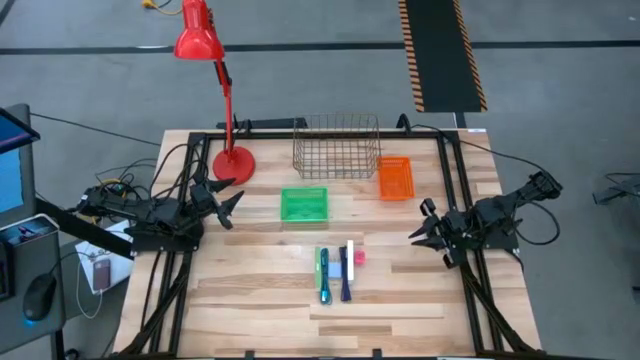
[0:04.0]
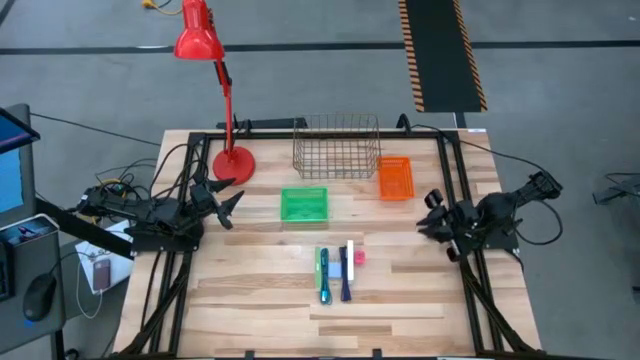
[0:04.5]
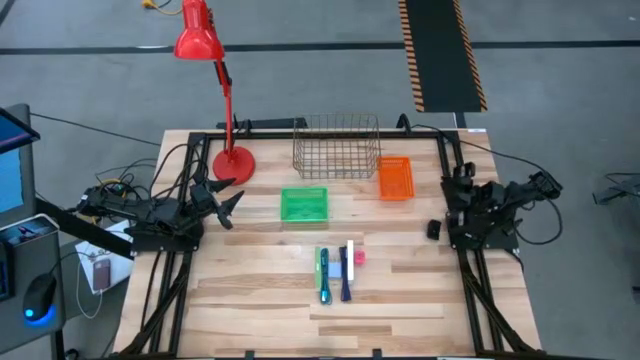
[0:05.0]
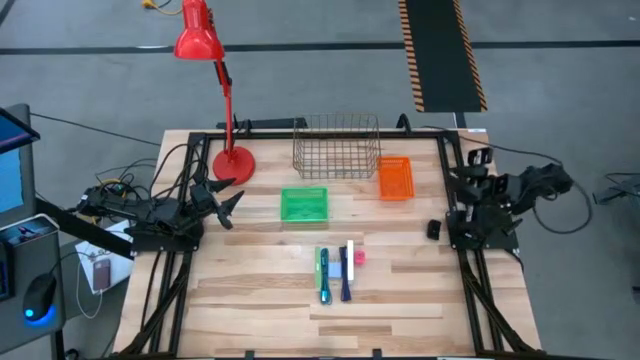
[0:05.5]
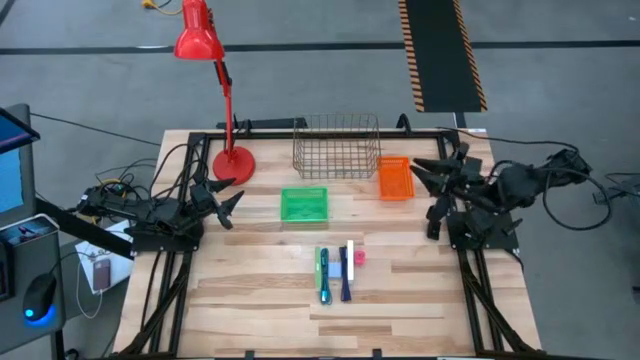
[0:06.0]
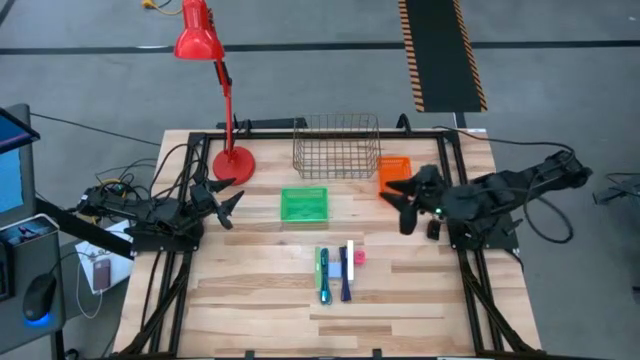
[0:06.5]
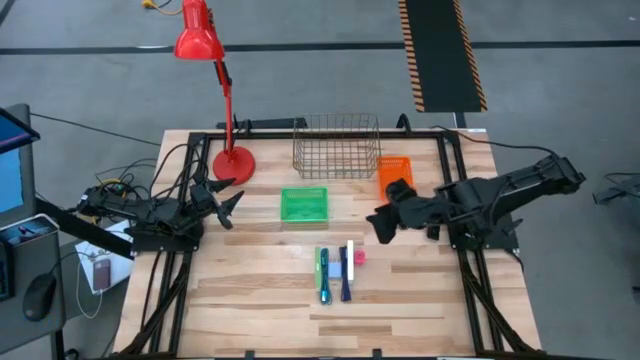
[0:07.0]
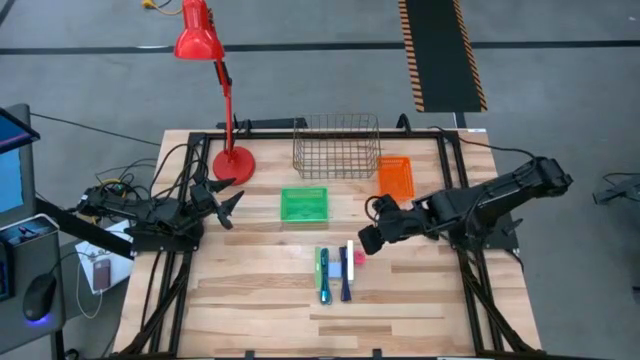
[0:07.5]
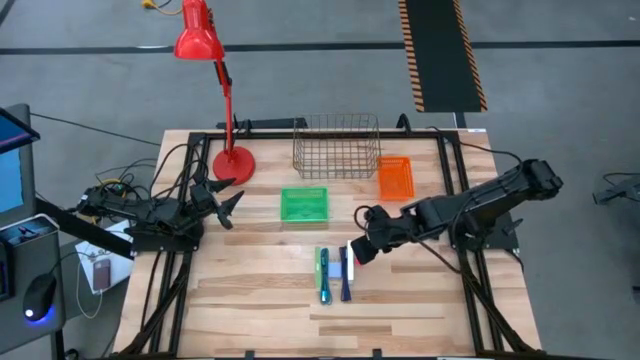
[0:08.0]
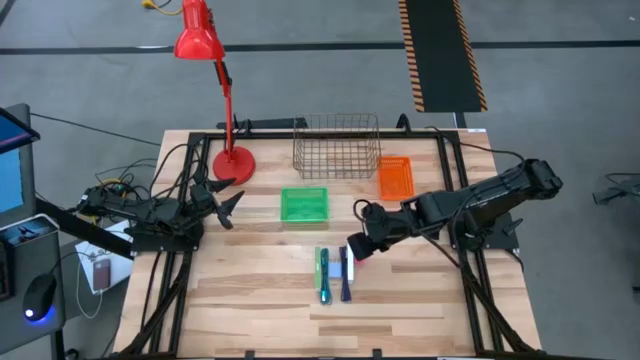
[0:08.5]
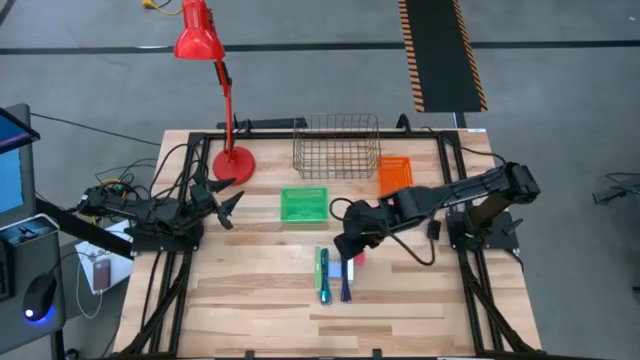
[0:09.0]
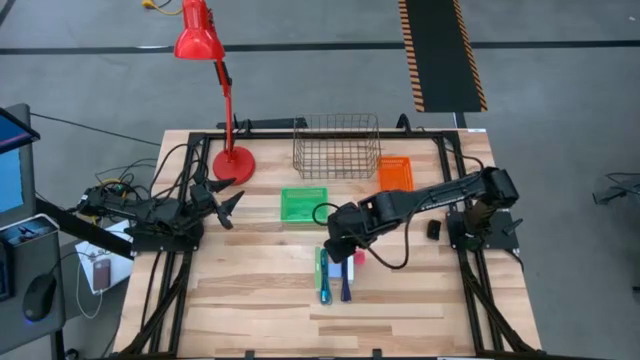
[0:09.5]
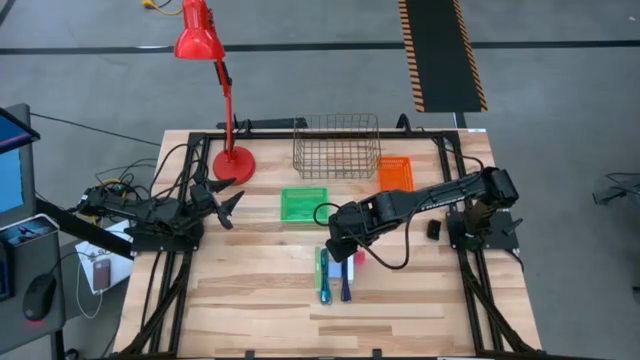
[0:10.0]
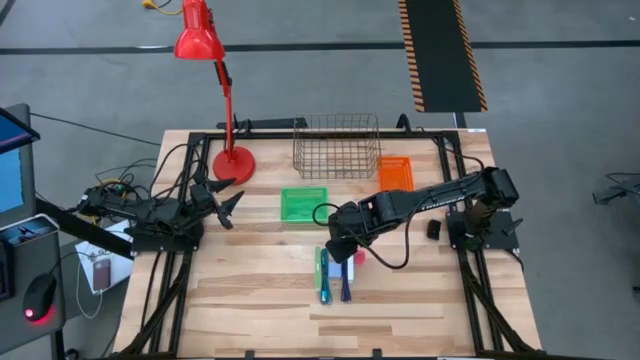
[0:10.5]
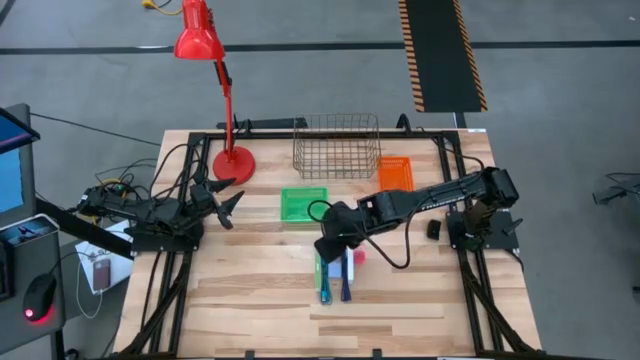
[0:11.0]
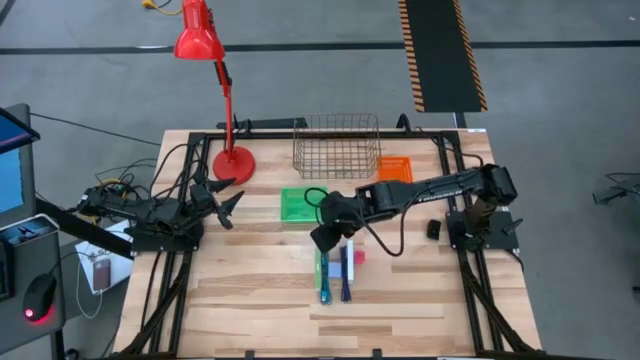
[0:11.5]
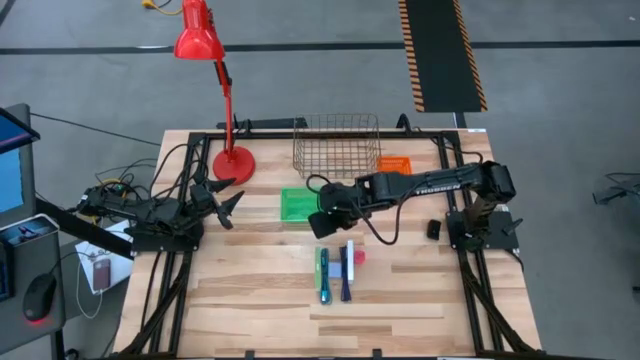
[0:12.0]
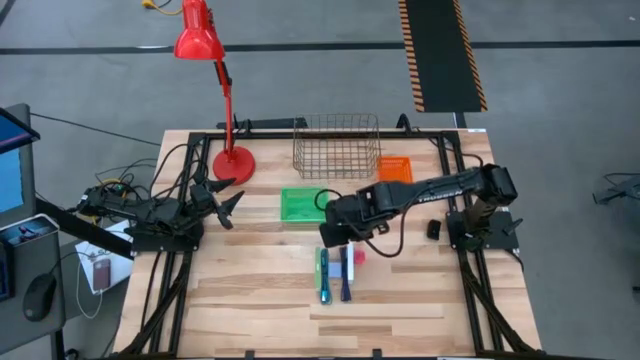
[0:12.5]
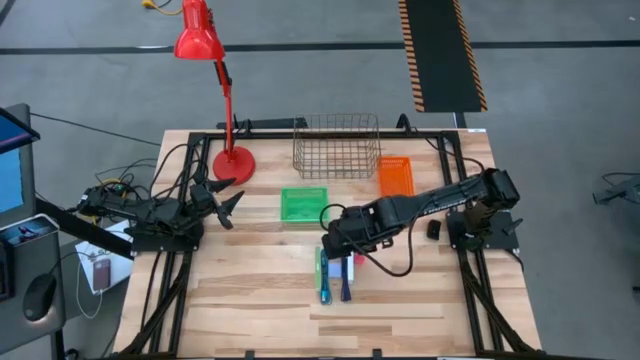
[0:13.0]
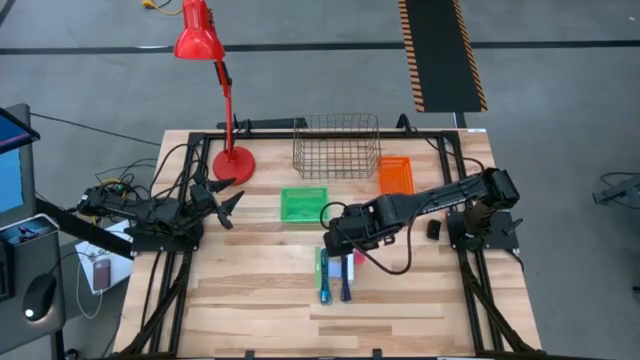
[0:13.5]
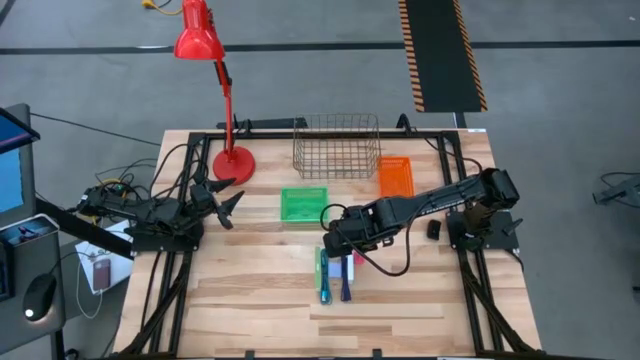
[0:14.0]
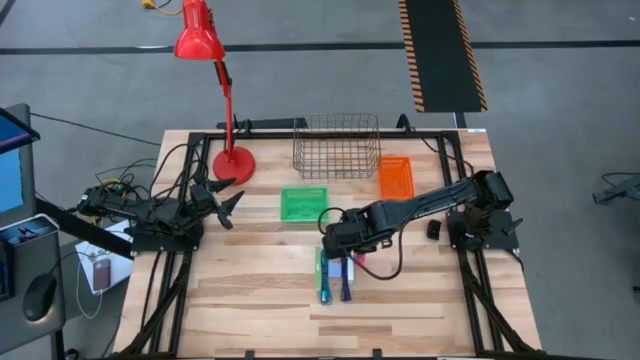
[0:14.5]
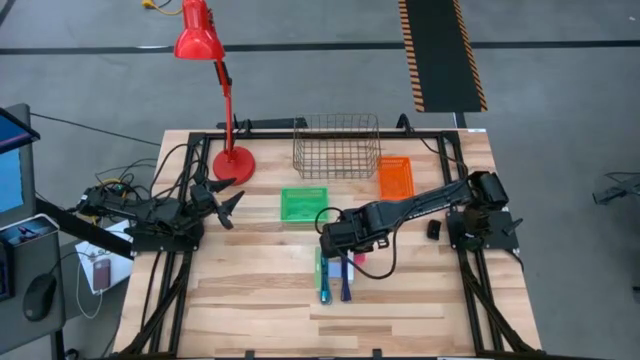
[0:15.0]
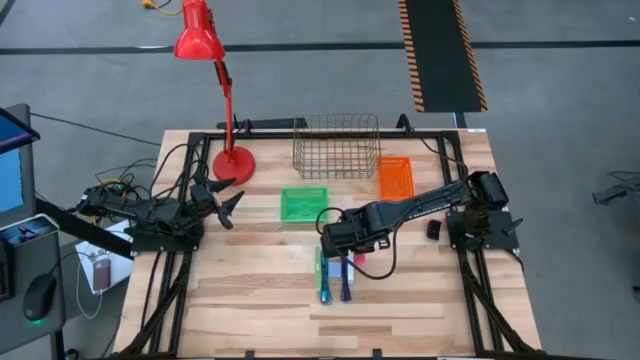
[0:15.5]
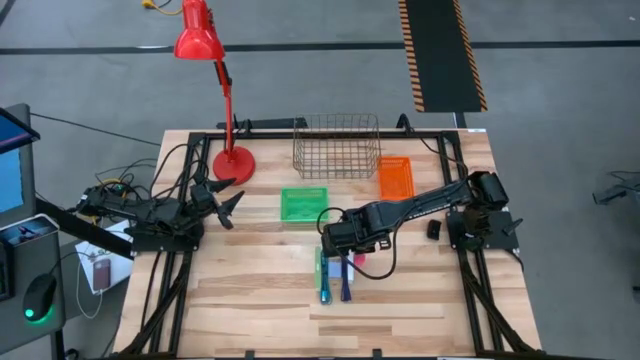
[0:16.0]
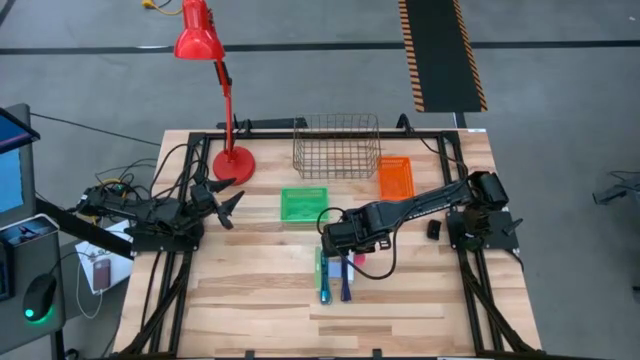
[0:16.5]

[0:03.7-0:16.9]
Task: Pick and place items into bin
Put the left white card reader box into the gold wire basket
